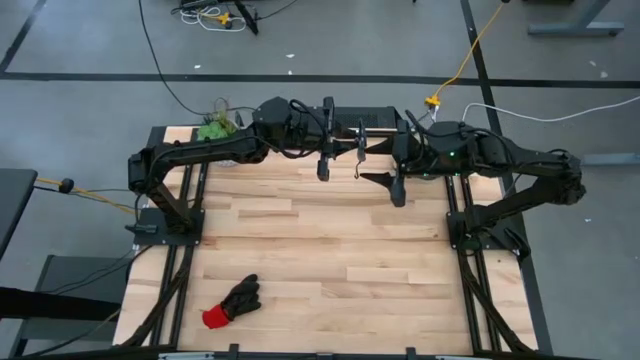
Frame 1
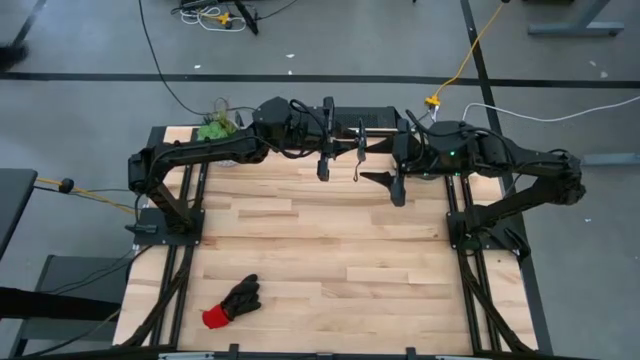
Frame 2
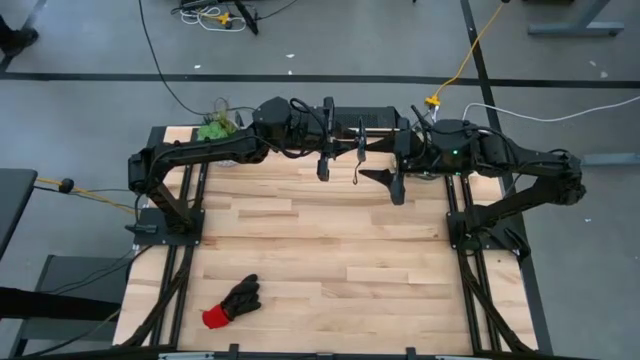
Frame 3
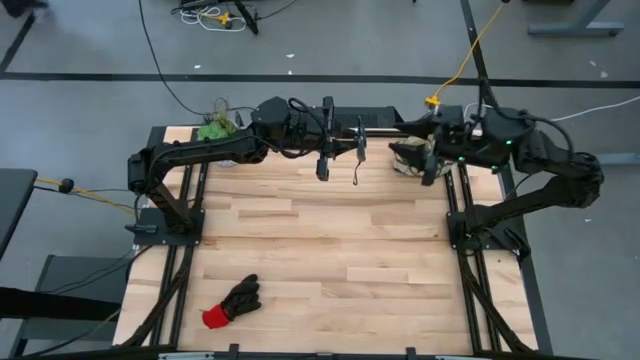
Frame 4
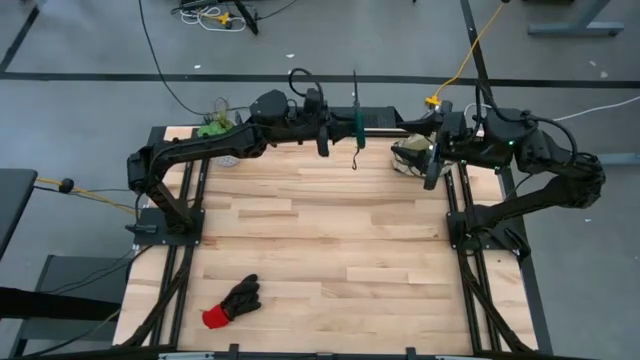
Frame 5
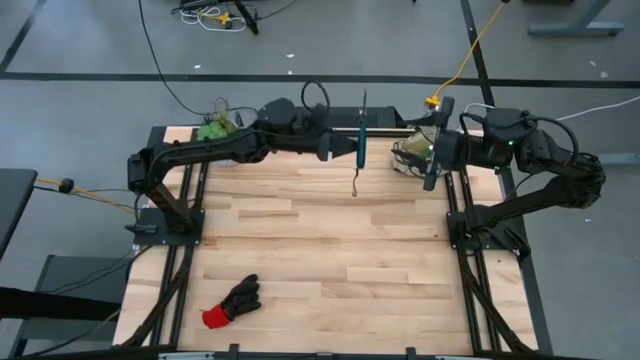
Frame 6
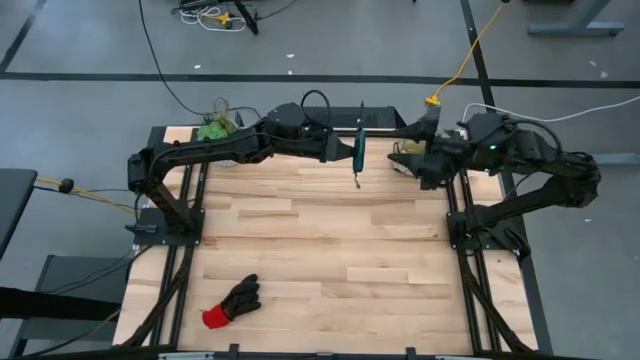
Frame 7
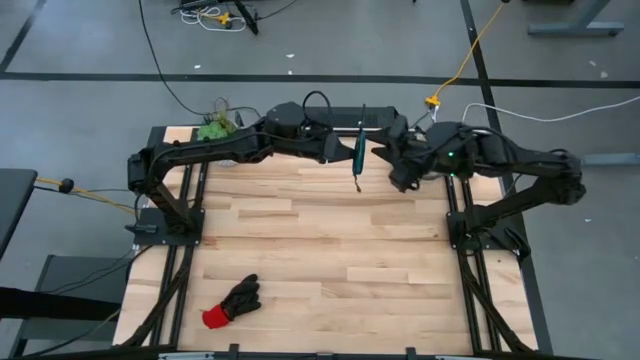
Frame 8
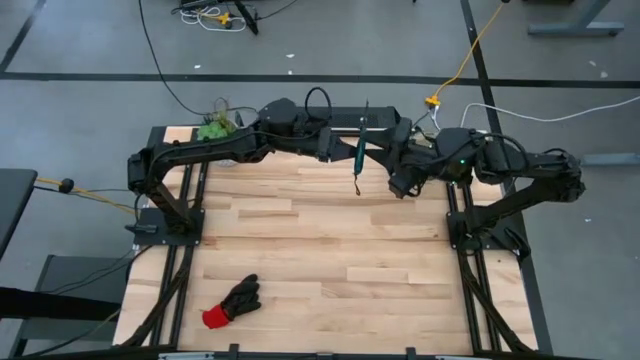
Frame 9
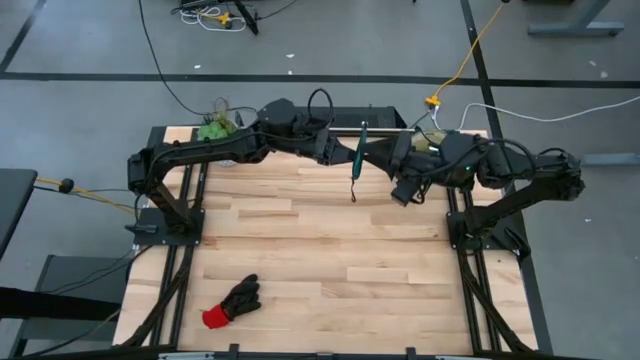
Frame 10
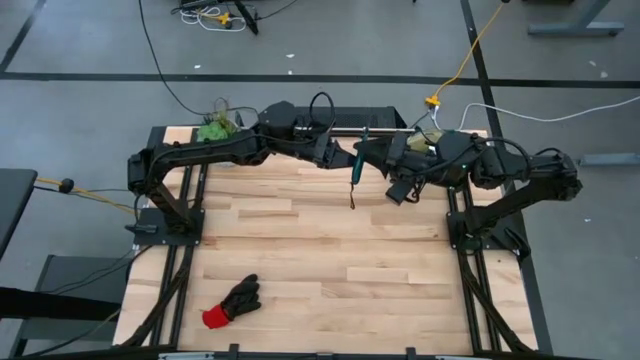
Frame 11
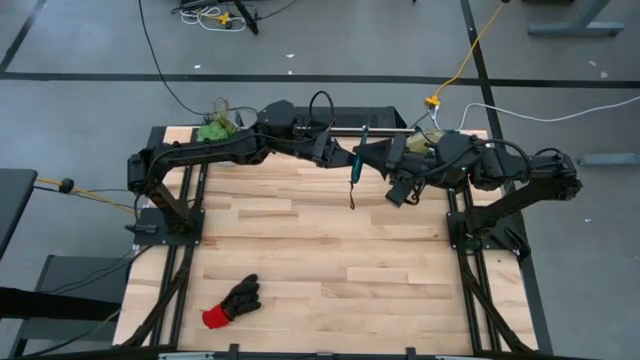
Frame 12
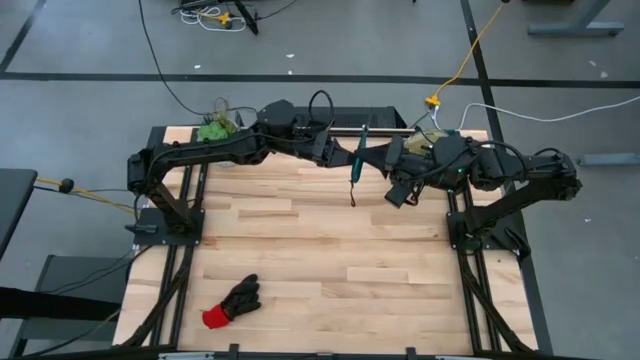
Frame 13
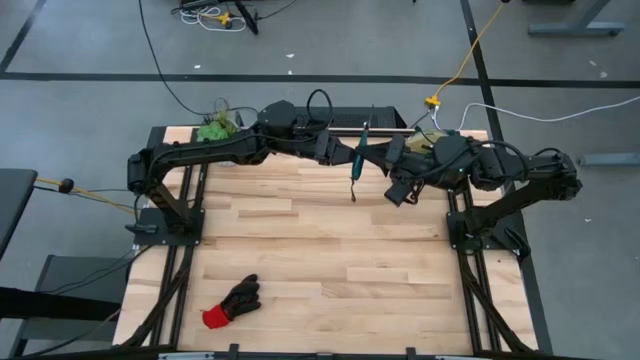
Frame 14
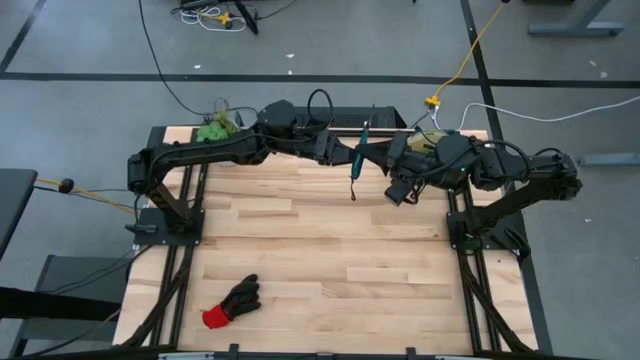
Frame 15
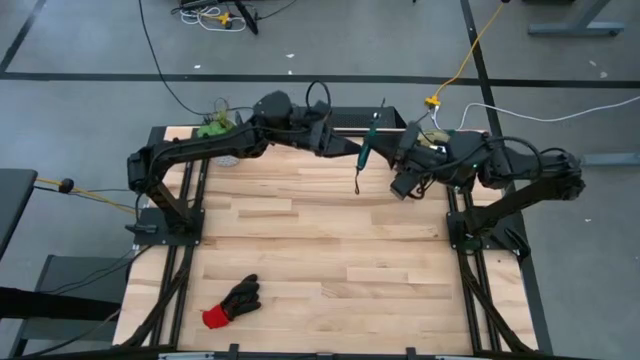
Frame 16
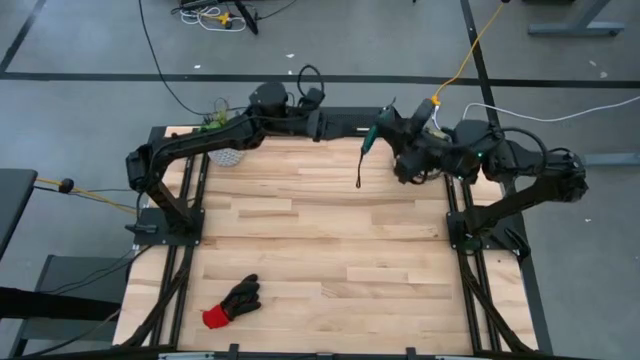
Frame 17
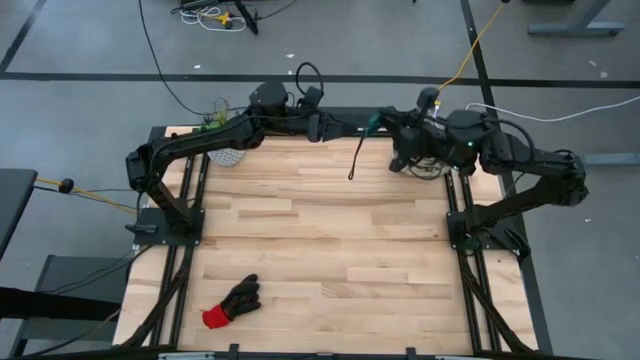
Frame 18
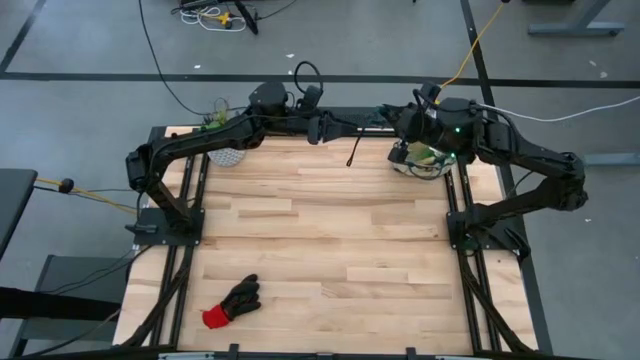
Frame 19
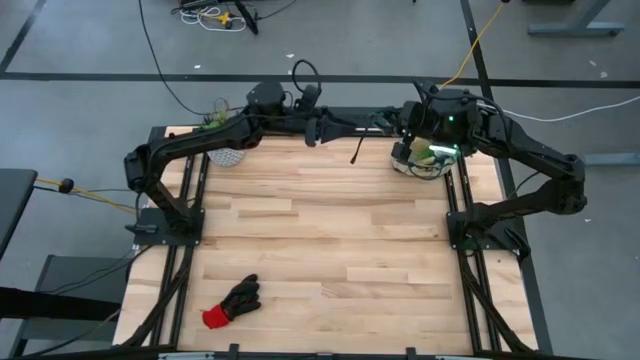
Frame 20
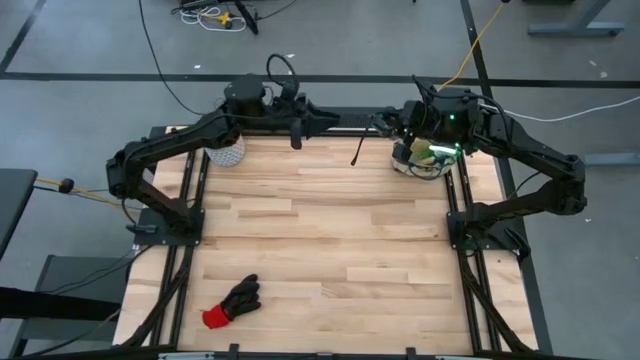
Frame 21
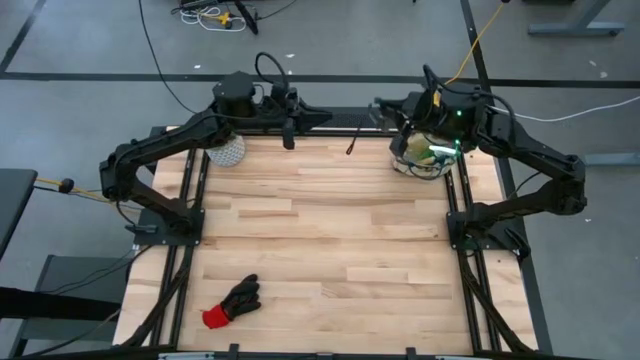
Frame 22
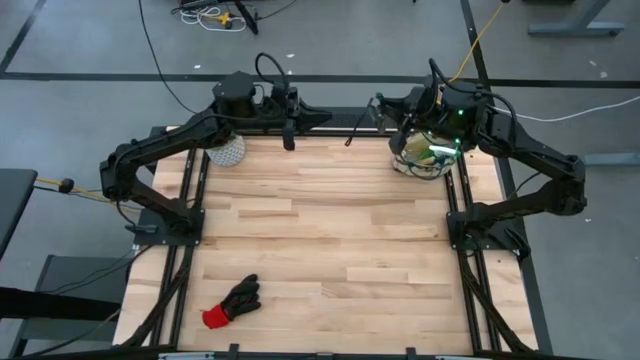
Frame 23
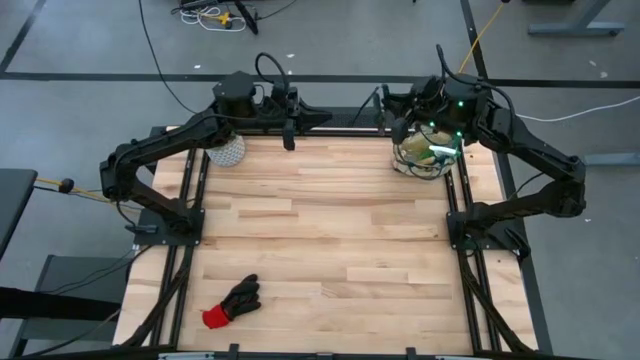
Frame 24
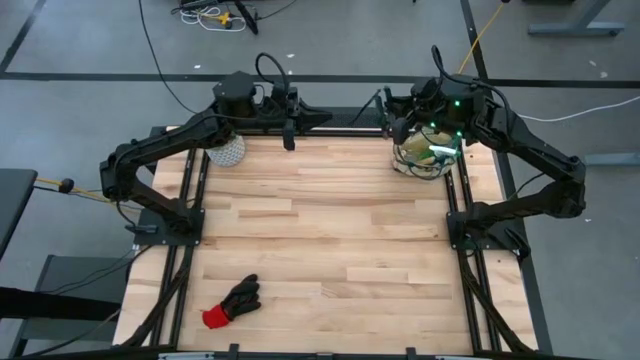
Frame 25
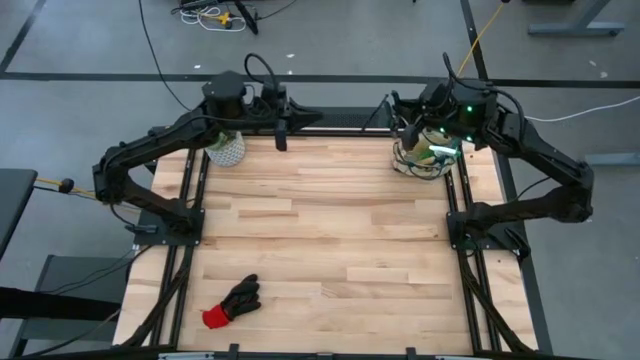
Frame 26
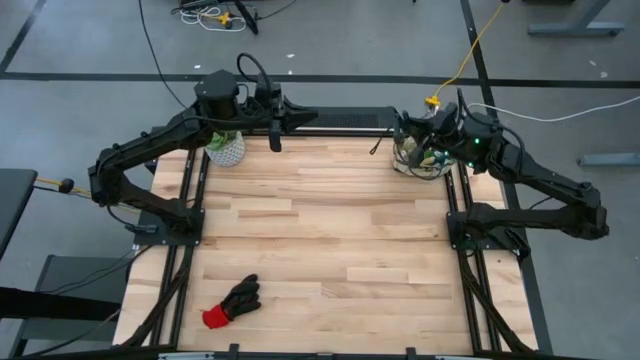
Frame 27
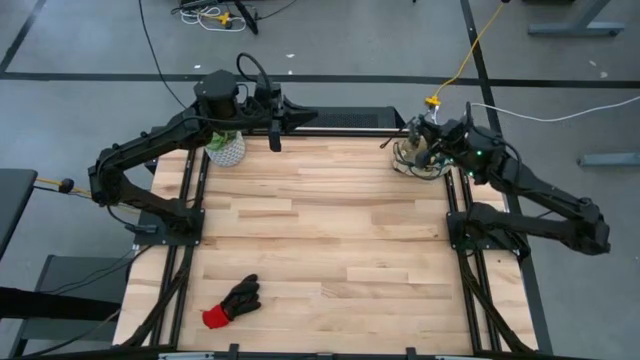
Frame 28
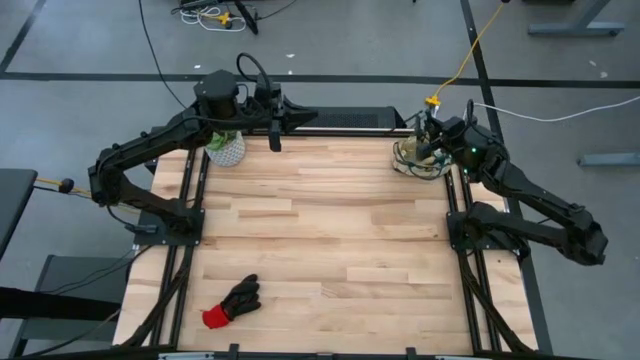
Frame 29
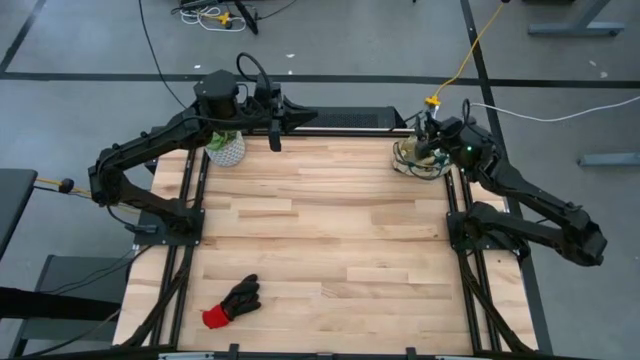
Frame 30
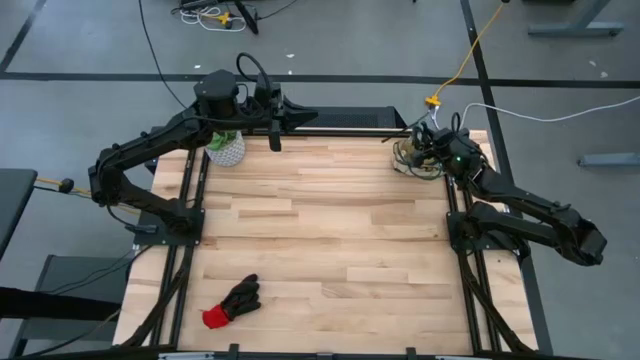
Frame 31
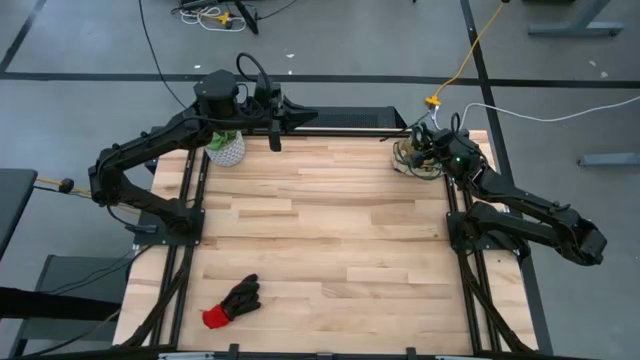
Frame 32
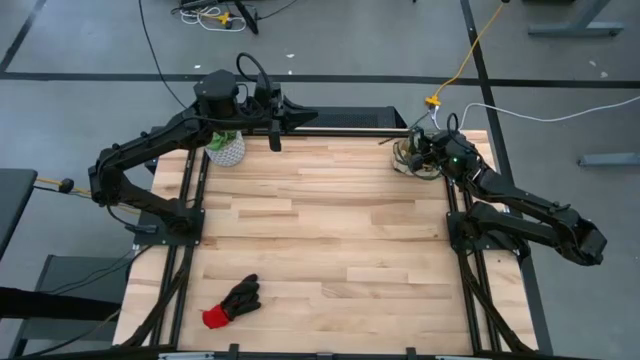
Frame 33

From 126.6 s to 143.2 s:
Task: Pick & Place Garden tools in Gardening bag
Put the green shear scissors into the brown gardening bag

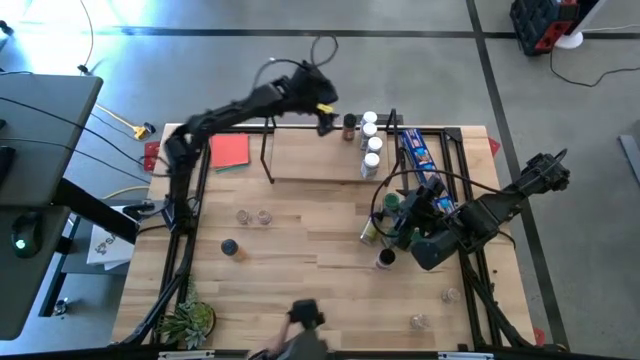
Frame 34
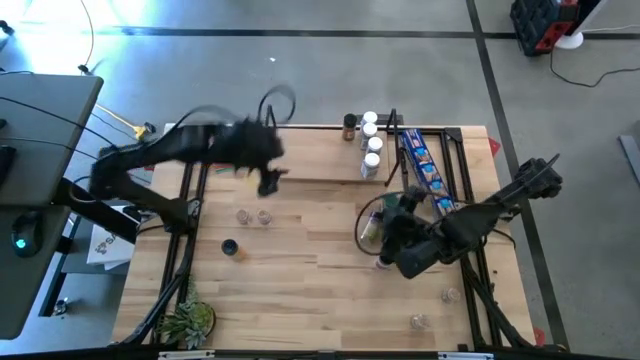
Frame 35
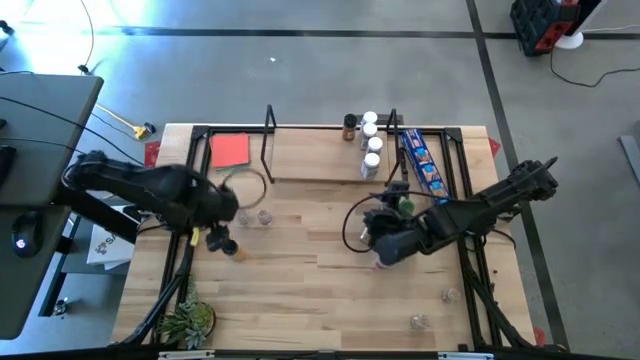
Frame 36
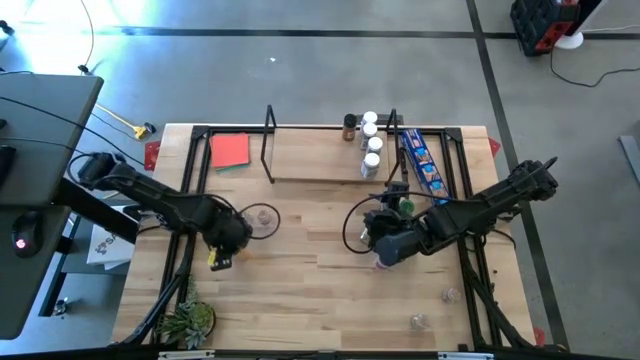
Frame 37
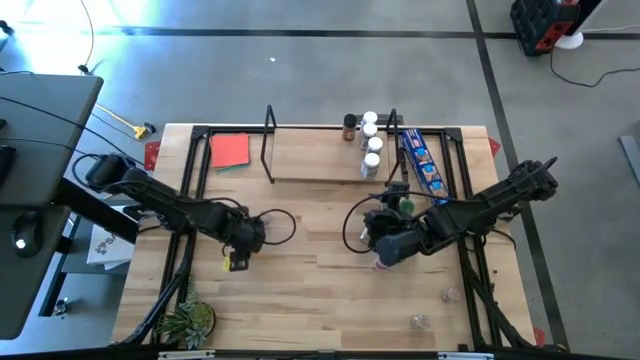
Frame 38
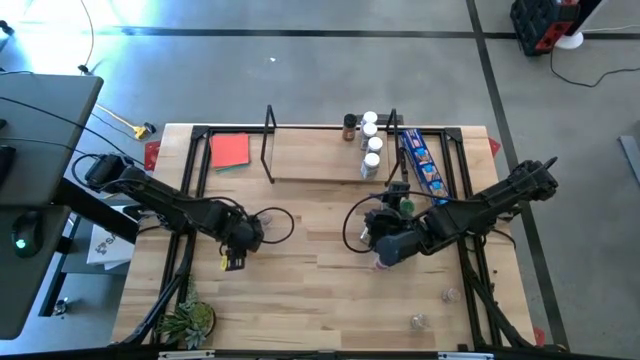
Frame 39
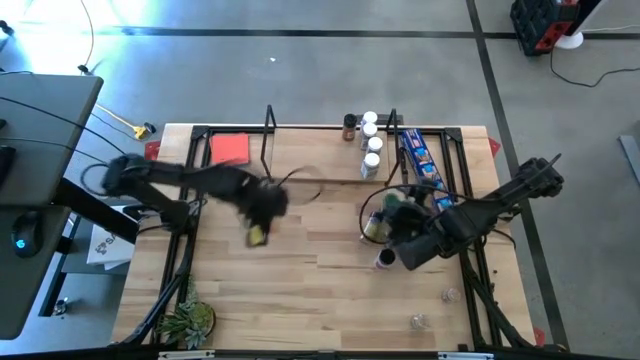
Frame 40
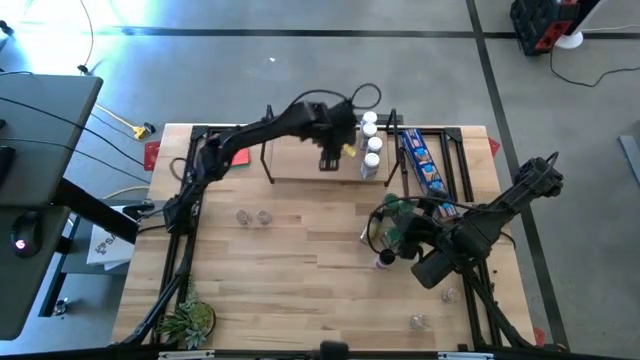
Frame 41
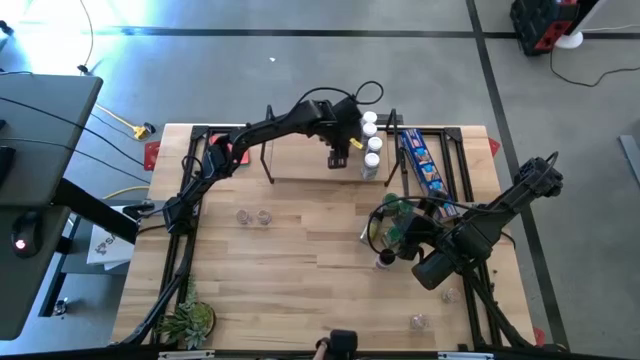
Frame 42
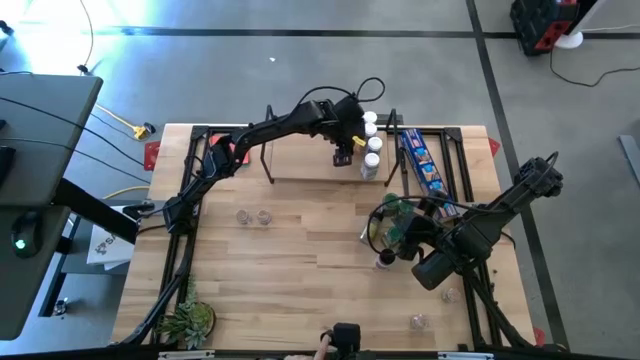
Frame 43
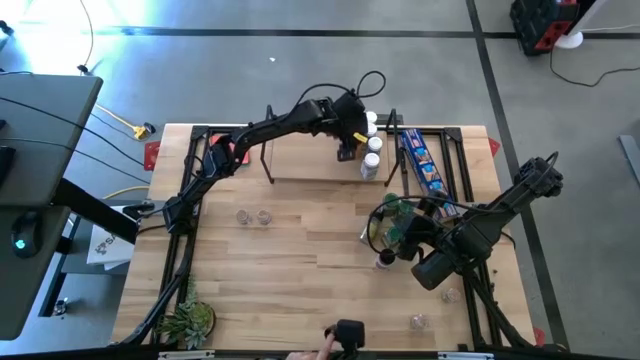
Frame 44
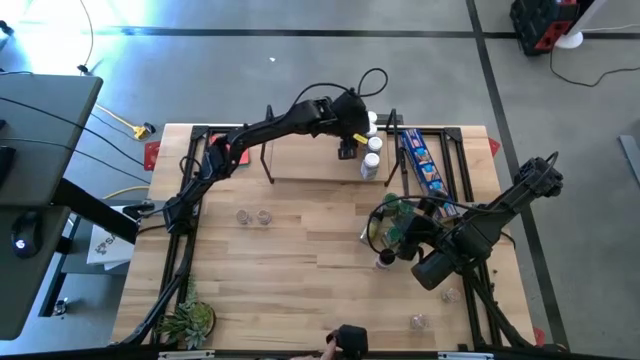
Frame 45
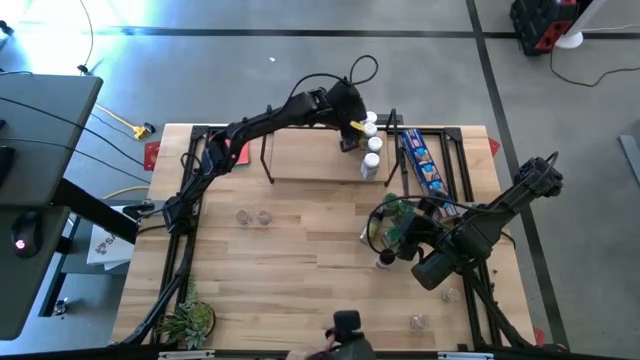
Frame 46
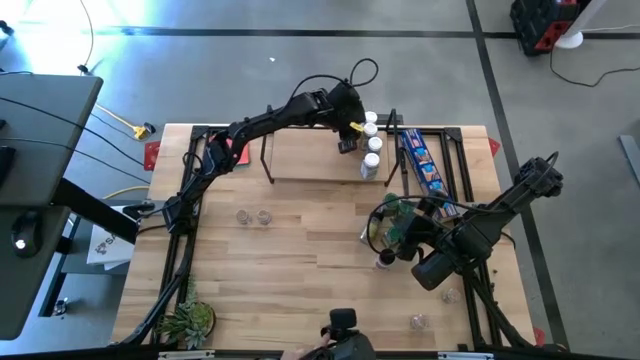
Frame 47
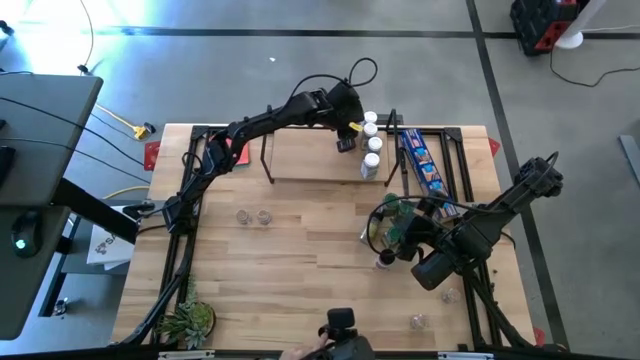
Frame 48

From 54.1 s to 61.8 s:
Task: Shelf spices
Put the left black seasoning bottle on the shelf aligned with the other black seasoning bottle
